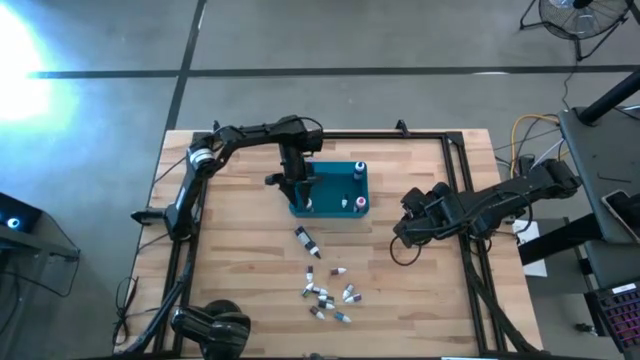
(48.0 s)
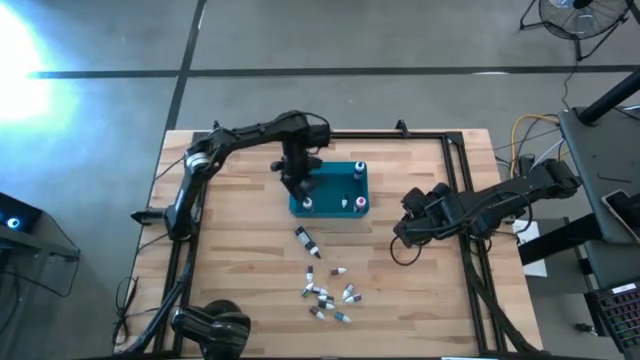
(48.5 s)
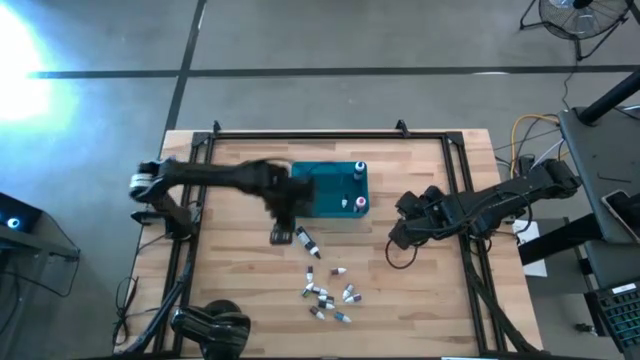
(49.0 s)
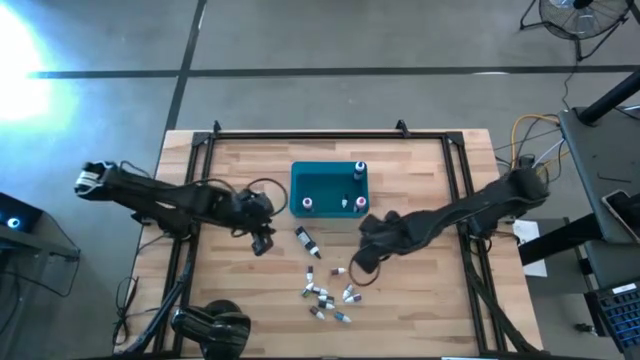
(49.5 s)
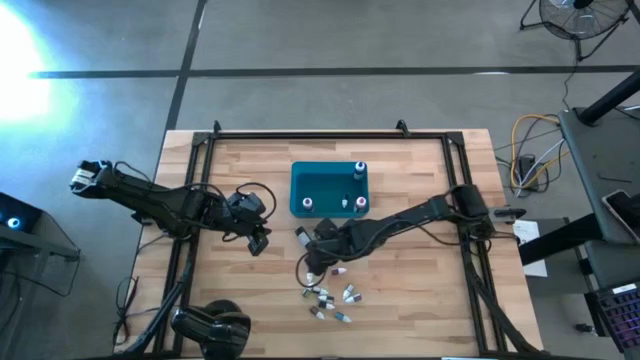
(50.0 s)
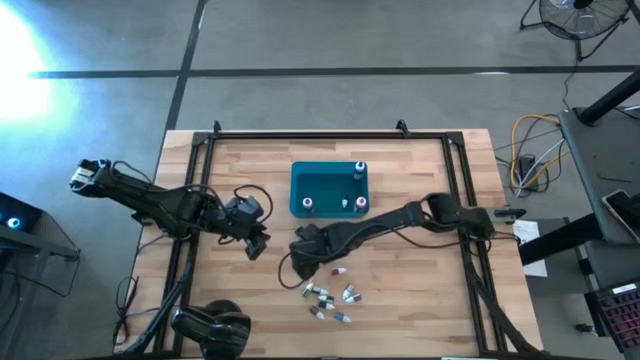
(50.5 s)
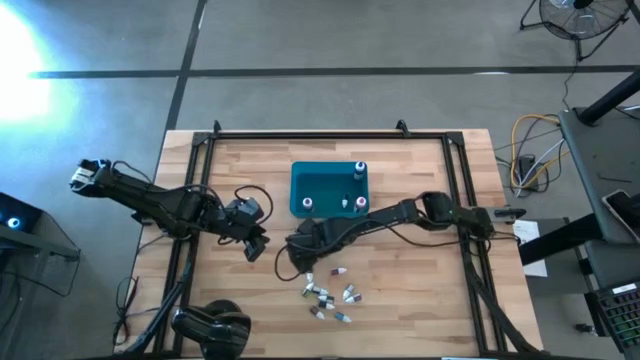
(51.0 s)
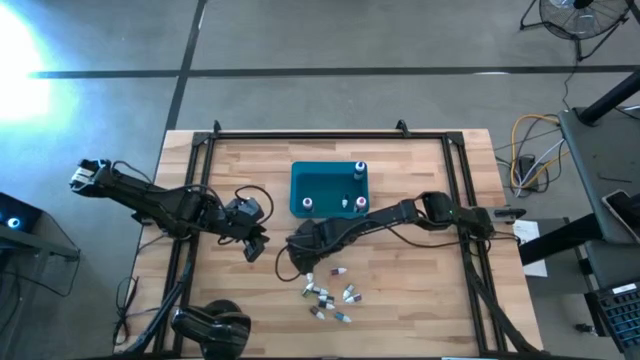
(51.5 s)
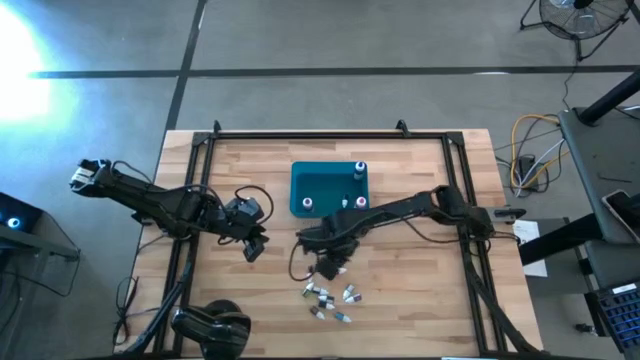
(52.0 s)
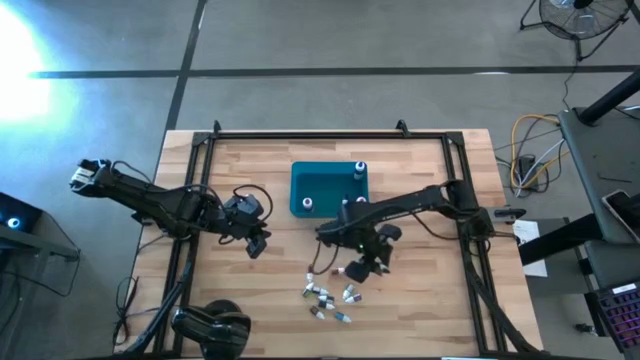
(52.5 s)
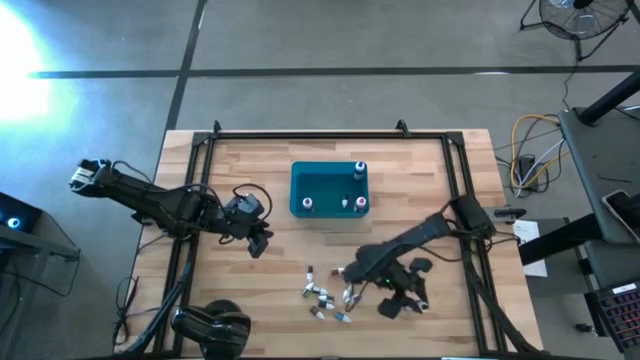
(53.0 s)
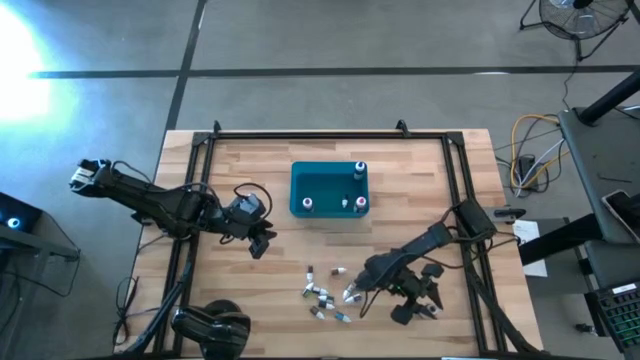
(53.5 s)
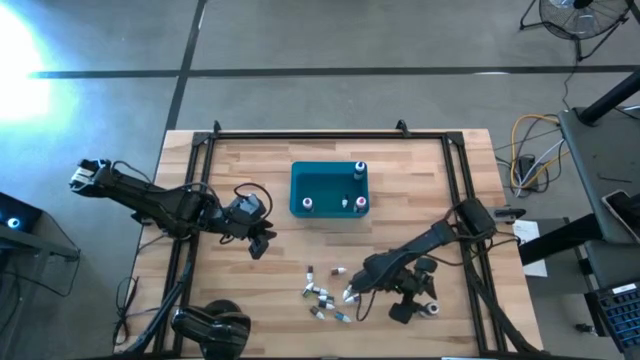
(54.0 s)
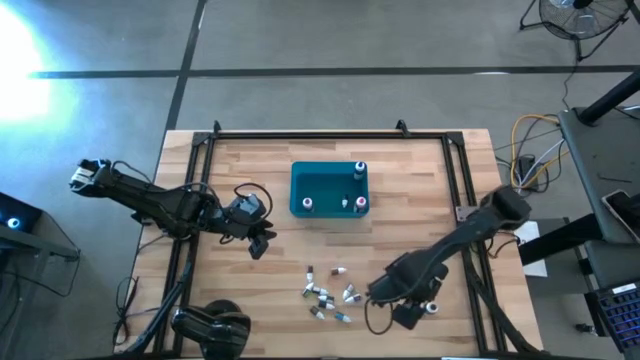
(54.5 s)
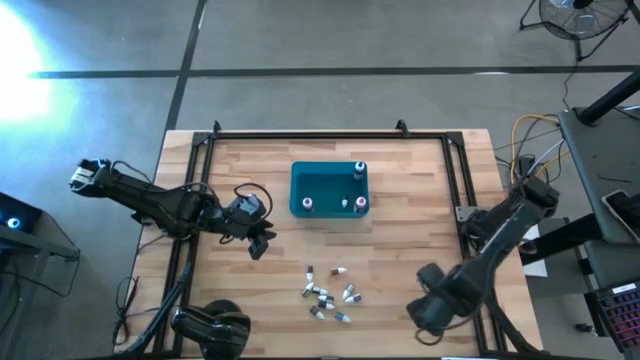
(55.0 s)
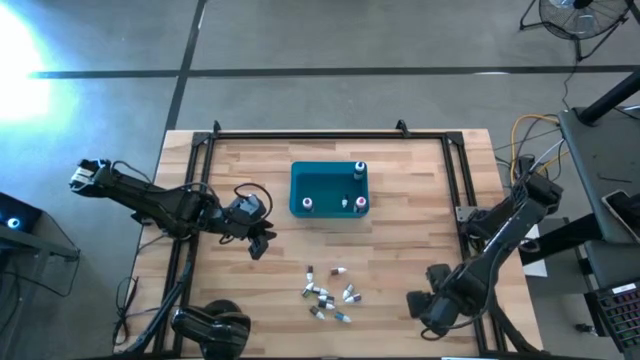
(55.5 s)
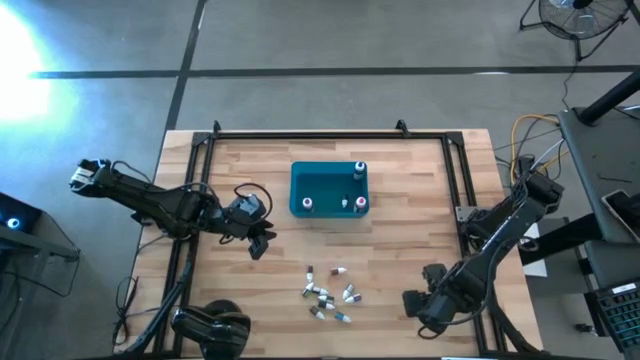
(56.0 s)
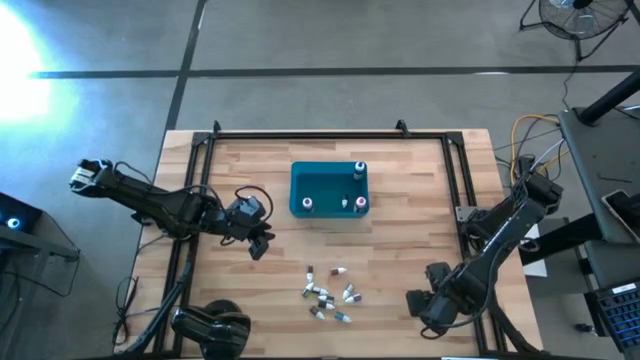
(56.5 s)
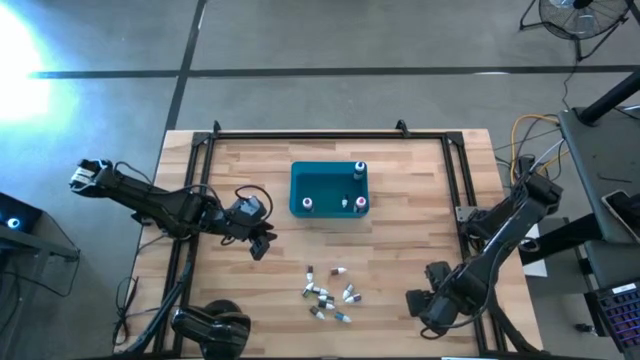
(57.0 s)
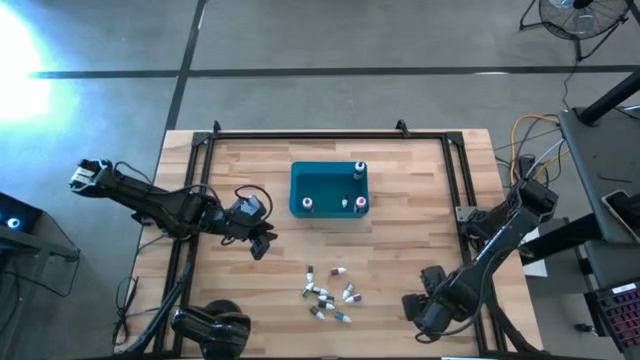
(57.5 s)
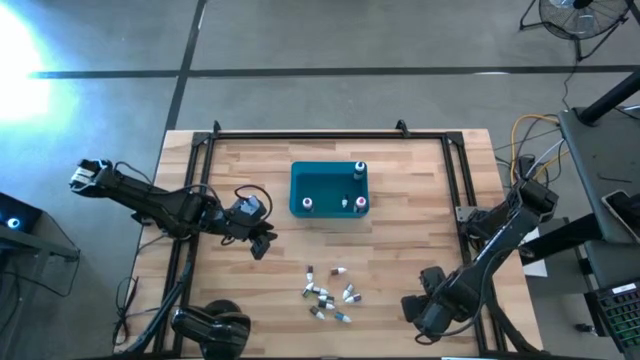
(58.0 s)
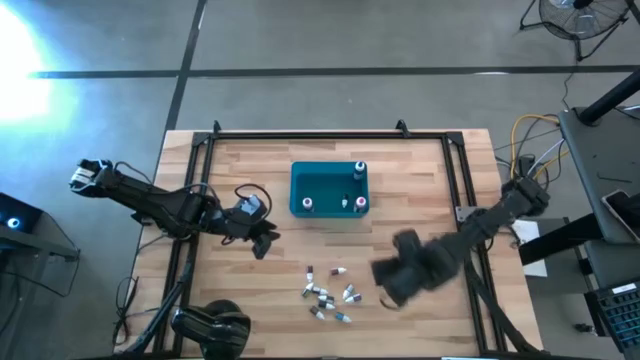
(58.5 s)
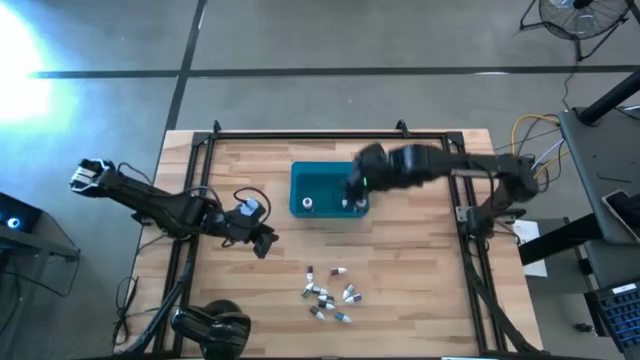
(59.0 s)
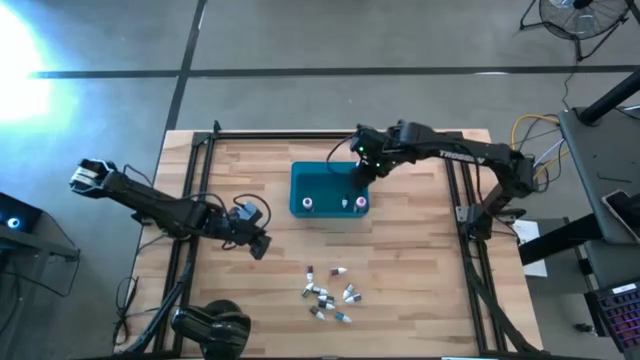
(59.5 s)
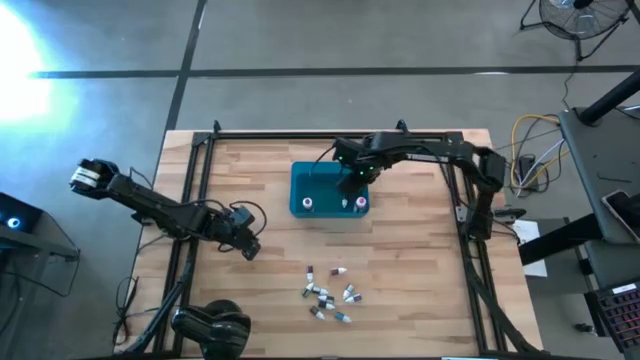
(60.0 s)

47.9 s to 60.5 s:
Task: Pick & Place food coloring
Put the black food coloring bottle into the blue bin

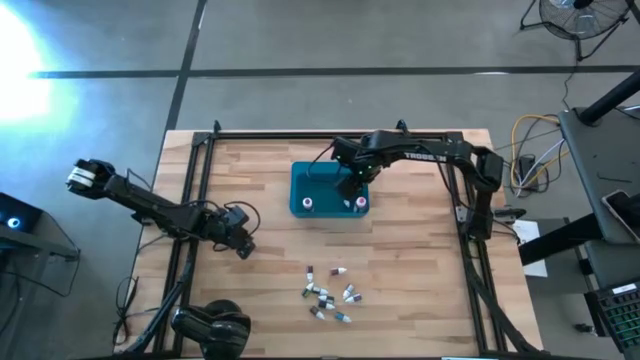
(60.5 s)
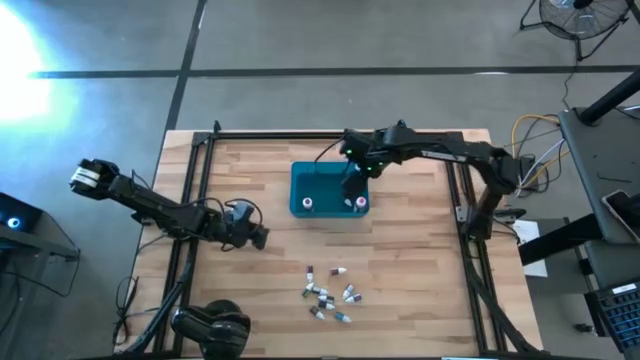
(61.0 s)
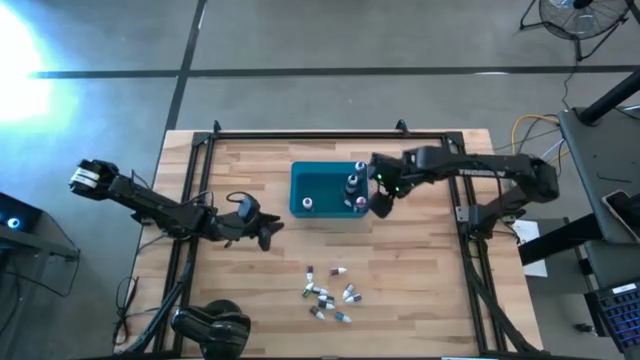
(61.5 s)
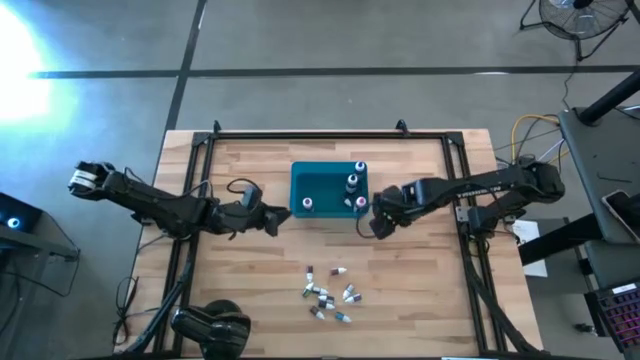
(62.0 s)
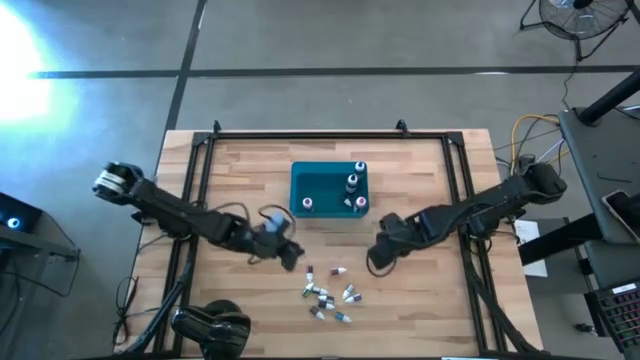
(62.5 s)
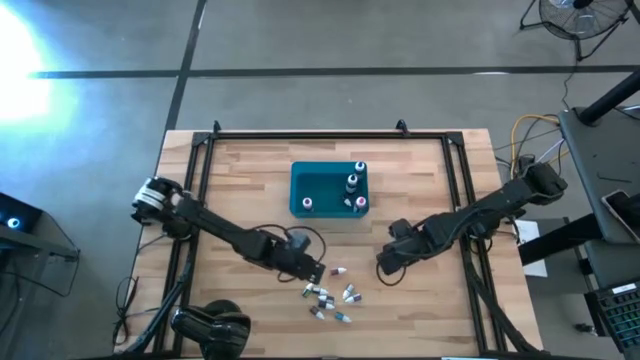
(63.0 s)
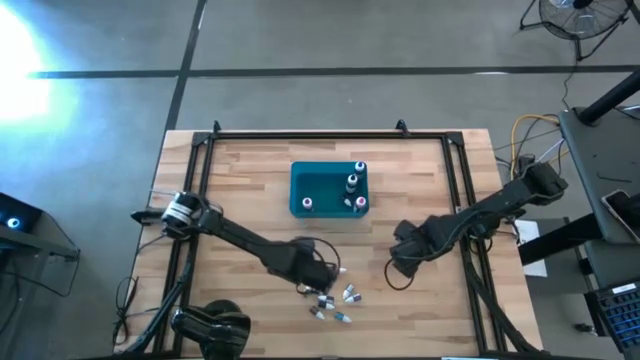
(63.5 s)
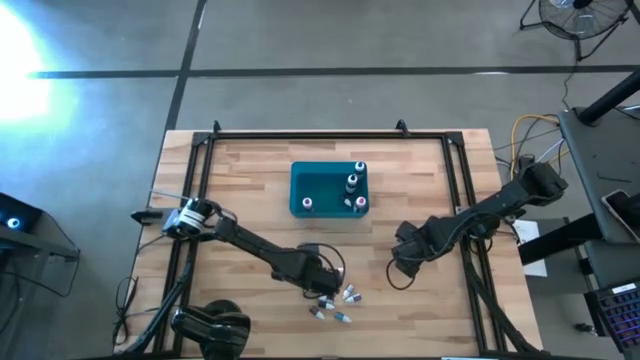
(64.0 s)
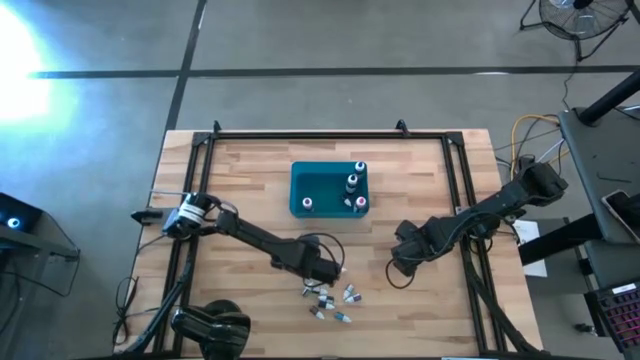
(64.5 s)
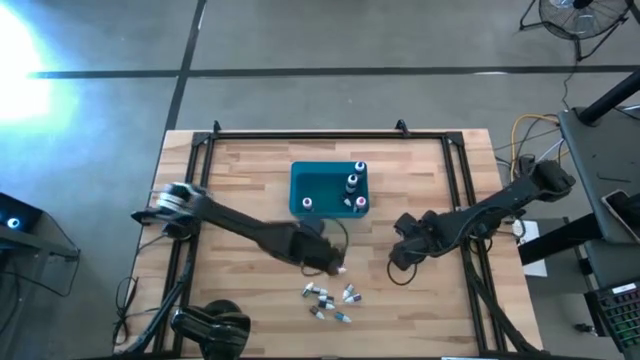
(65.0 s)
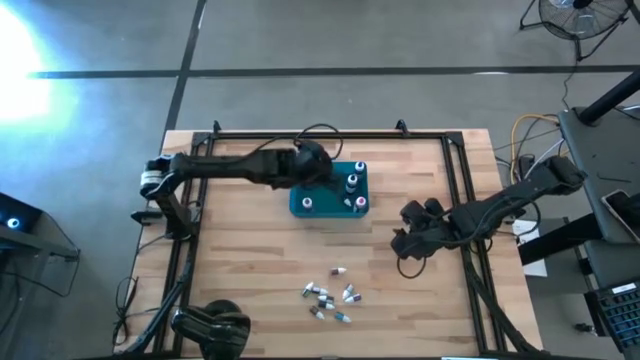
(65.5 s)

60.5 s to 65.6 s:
Put the red food coloring bottle into the blue bin

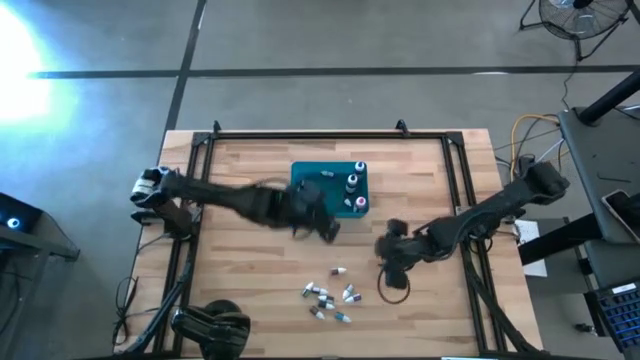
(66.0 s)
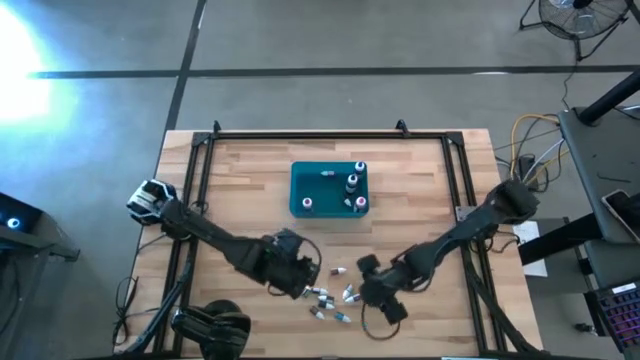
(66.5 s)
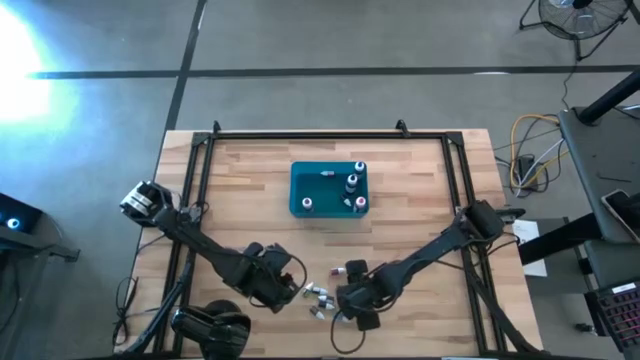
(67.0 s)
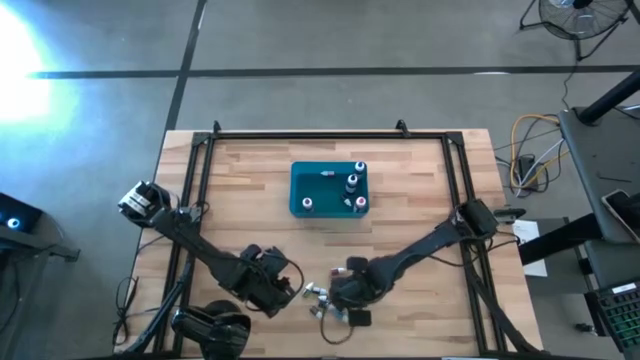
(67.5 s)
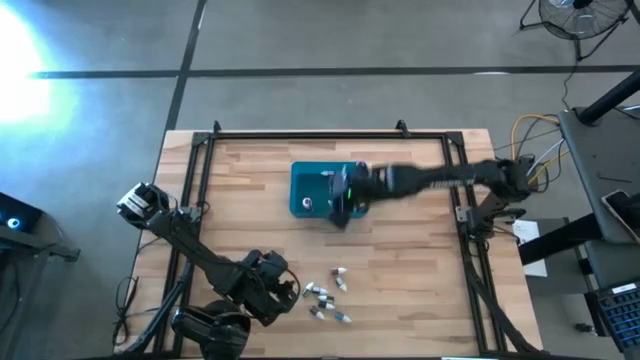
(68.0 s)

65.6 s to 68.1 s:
Put the violet food coloring bottle into the blue bin

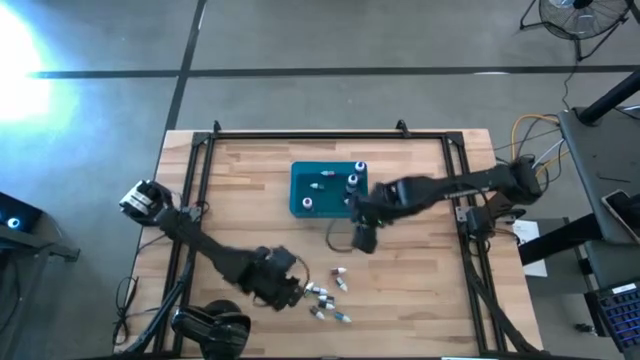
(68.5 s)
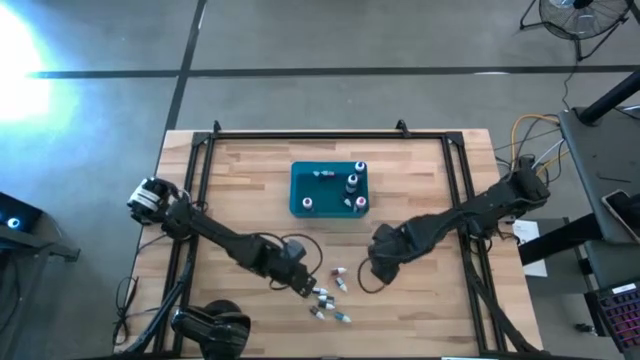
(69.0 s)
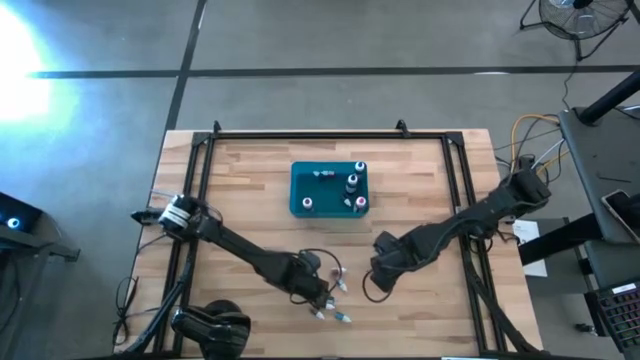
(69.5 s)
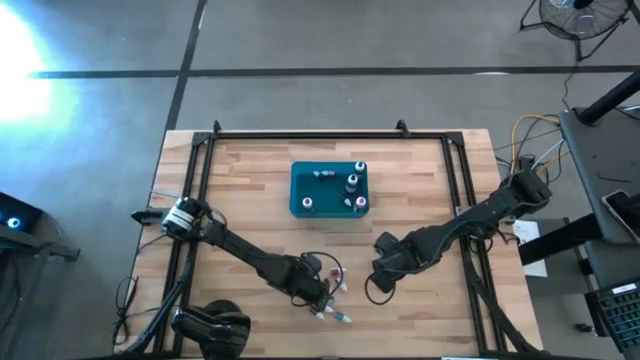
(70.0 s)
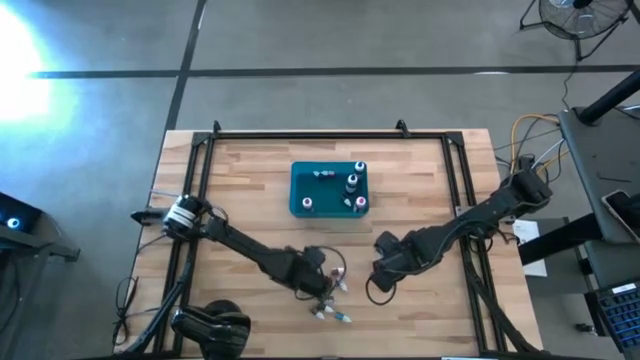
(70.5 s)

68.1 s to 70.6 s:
Put the green food coloring bottle into the blue bin
